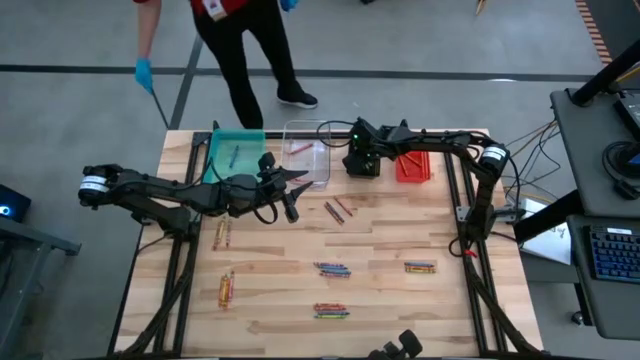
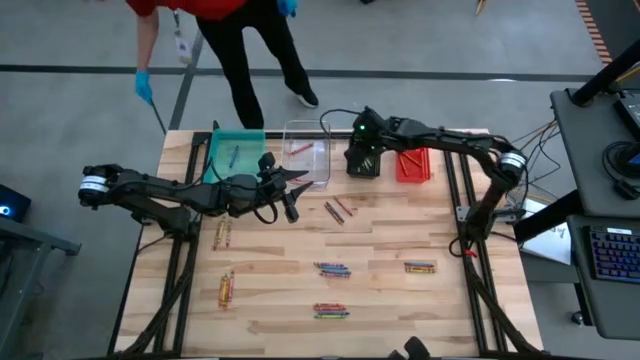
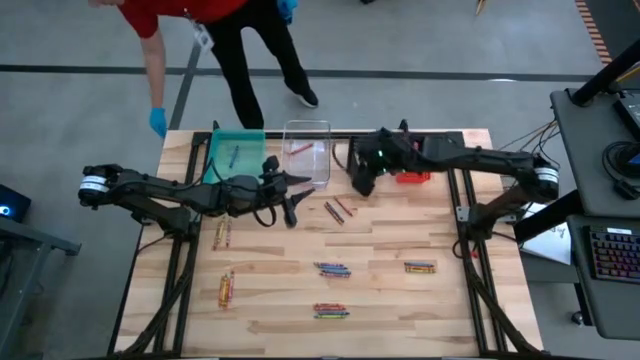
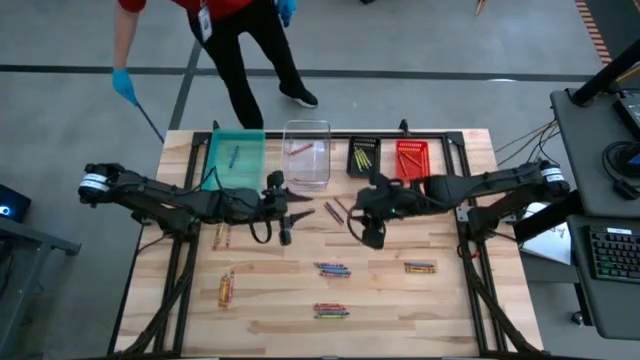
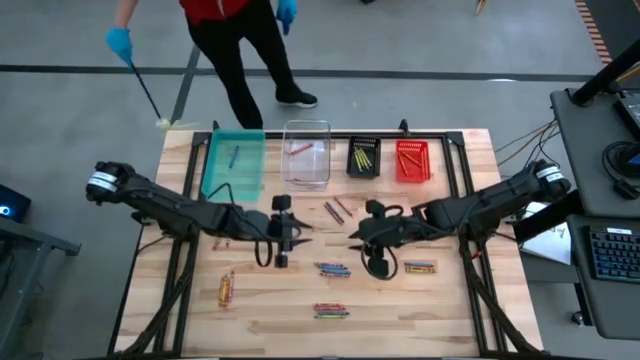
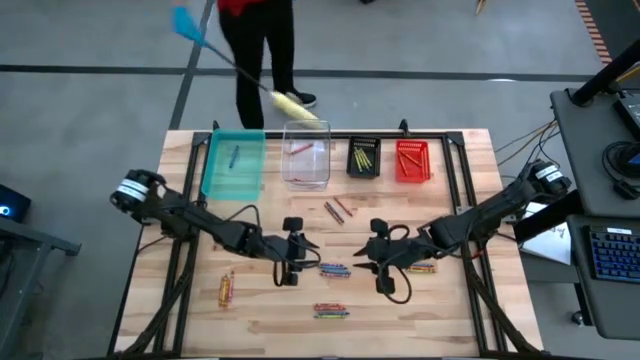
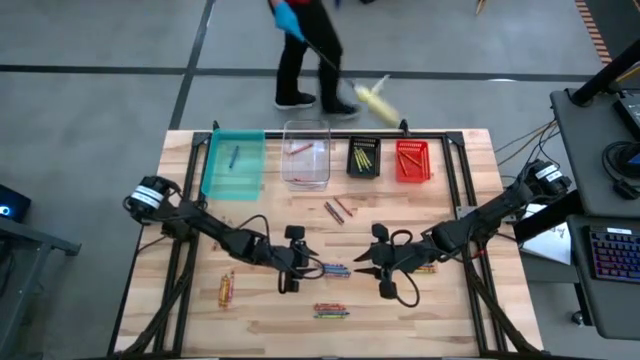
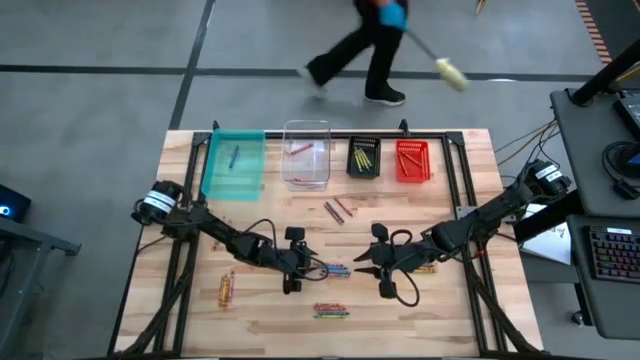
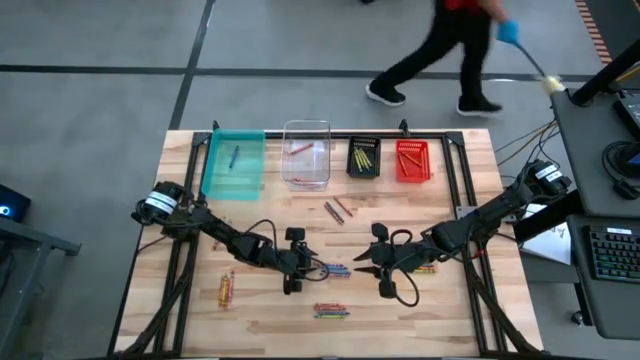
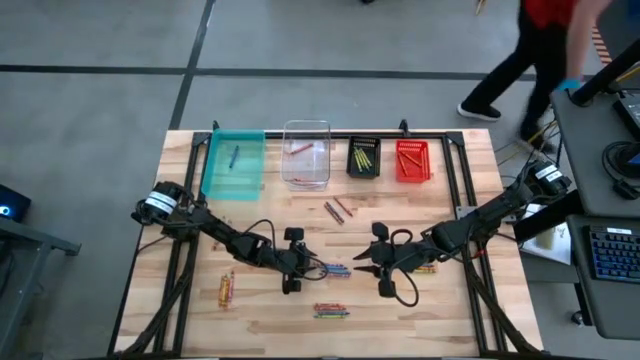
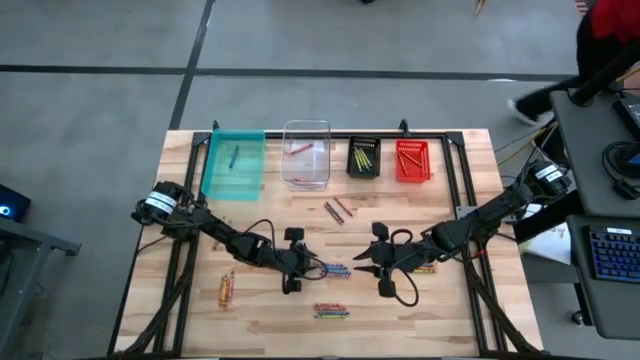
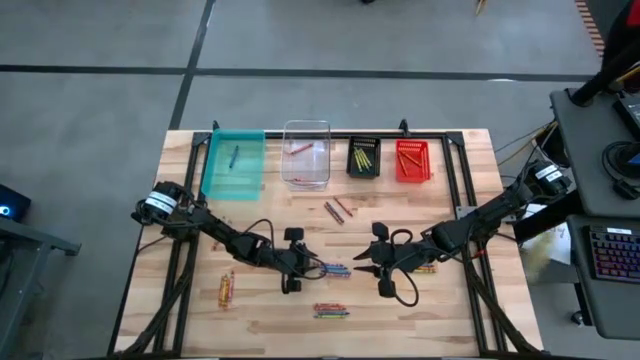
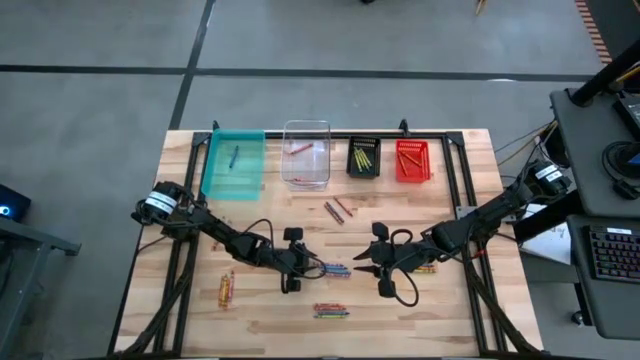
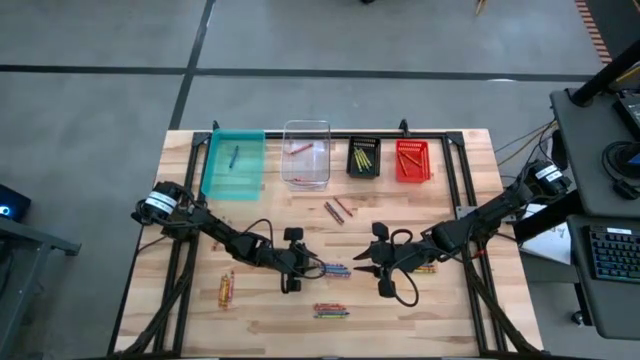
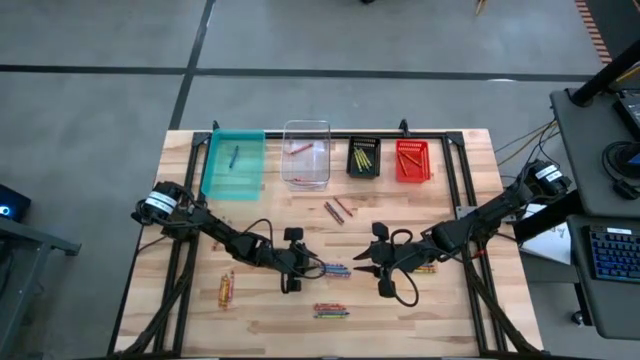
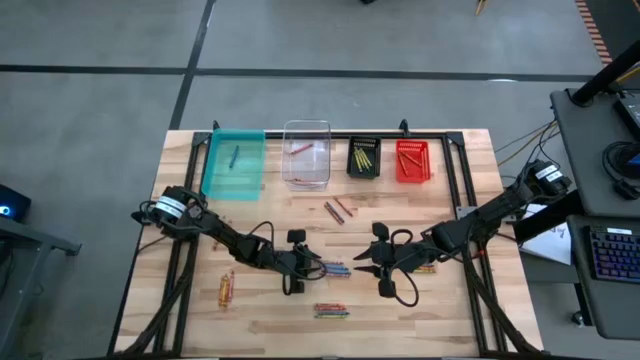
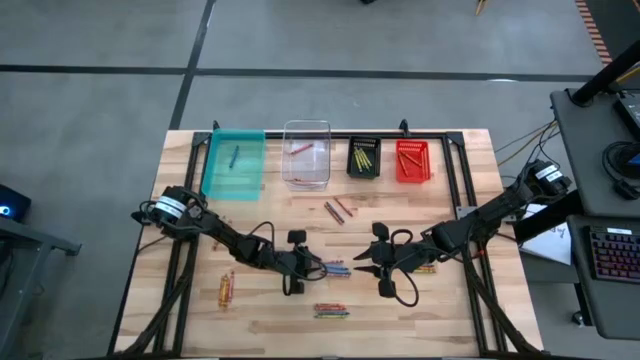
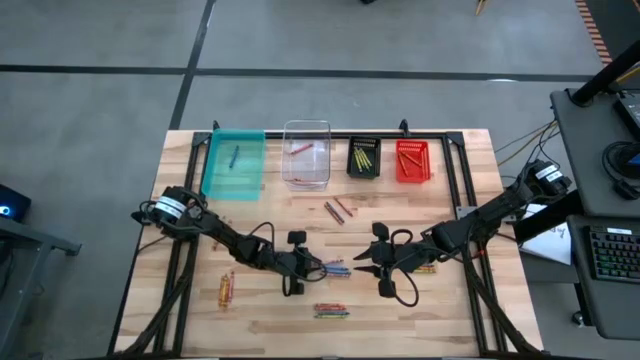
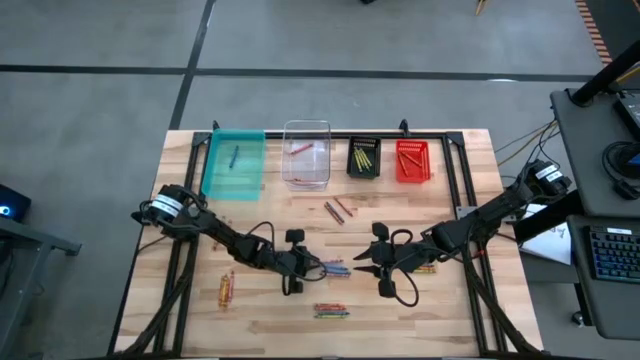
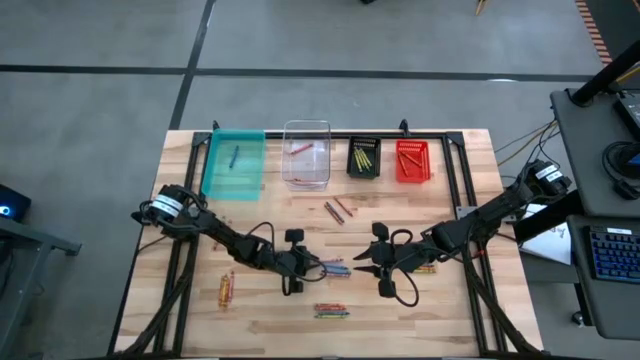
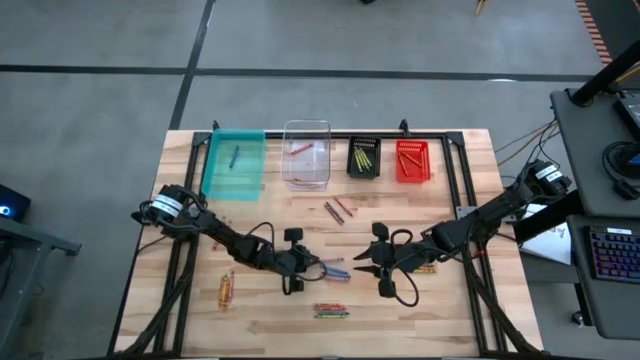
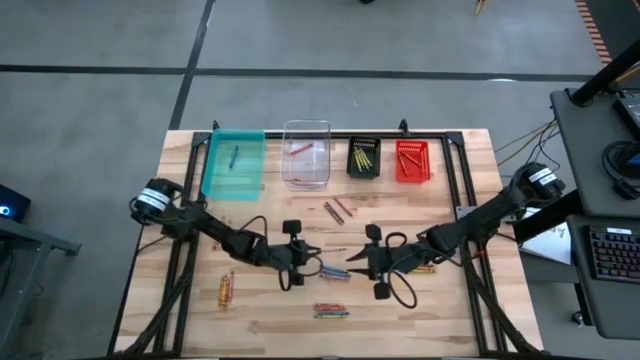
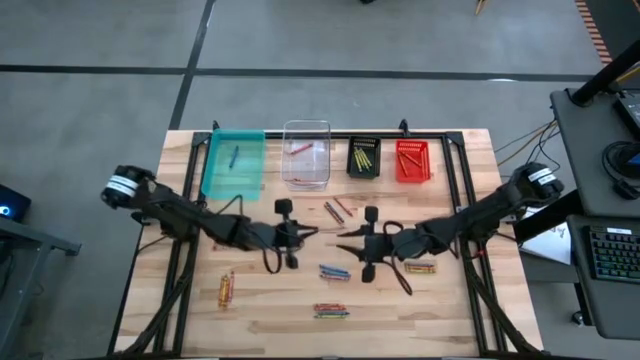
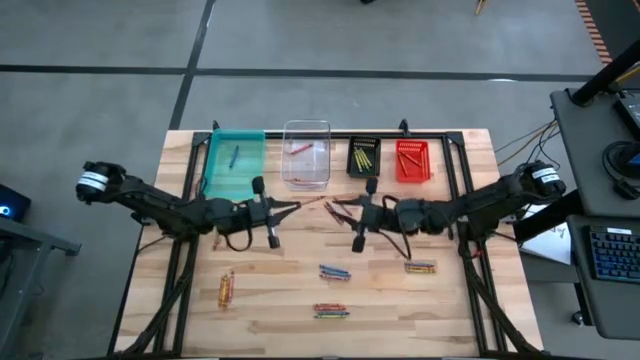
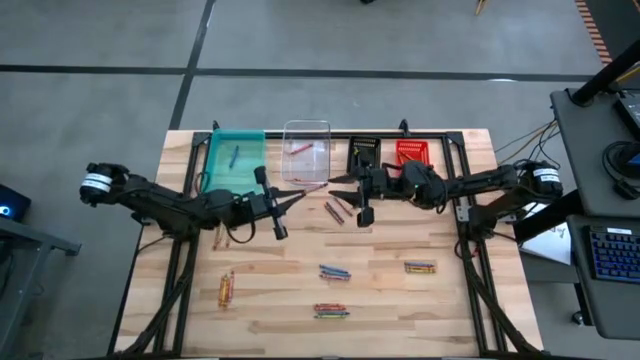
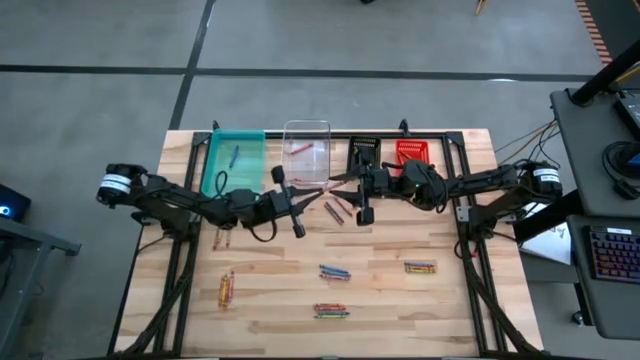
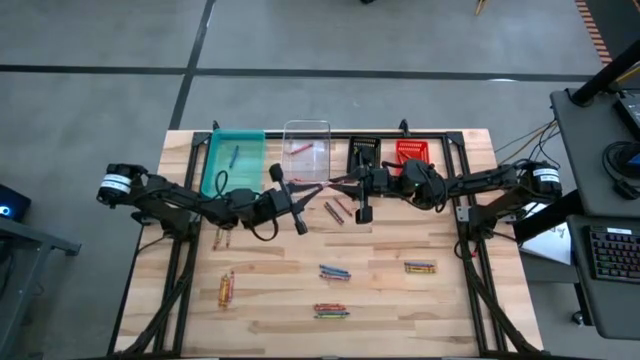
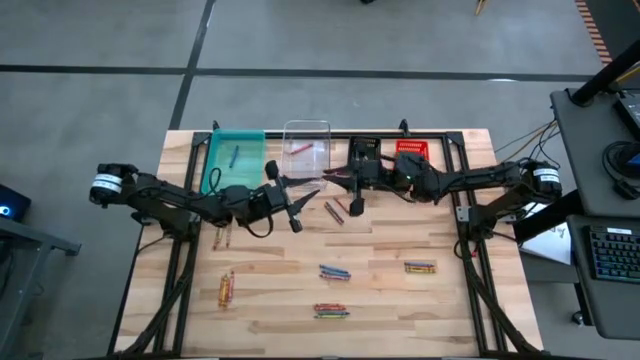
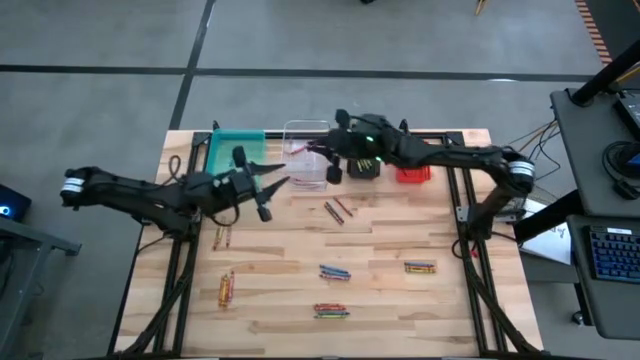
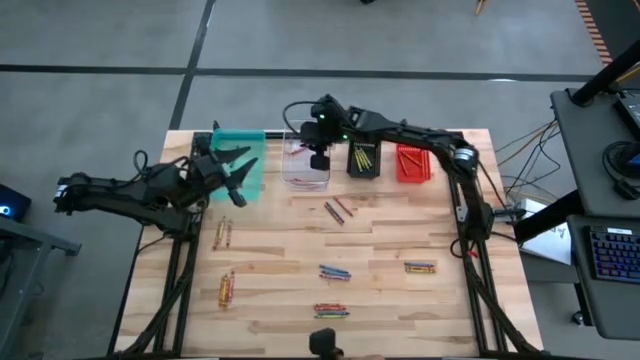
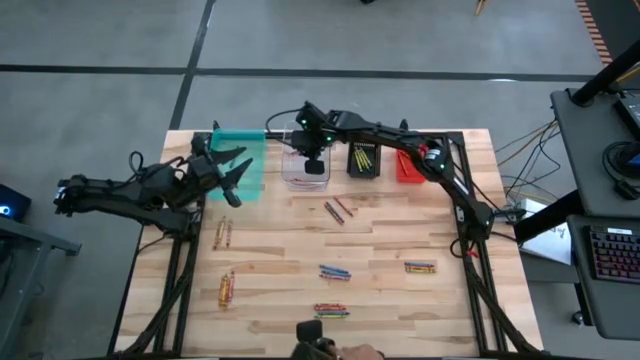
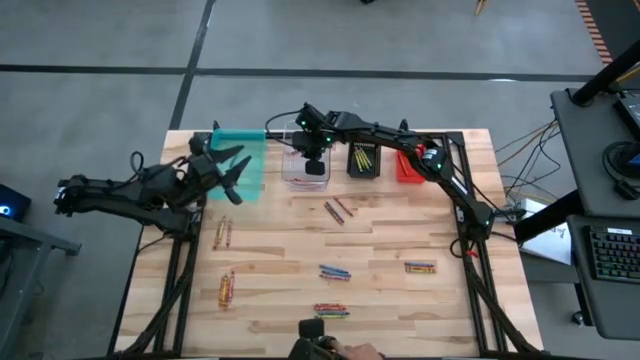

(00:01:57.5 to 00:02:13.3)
Task: Sort crayons
Put the red crayon into the transparent bin

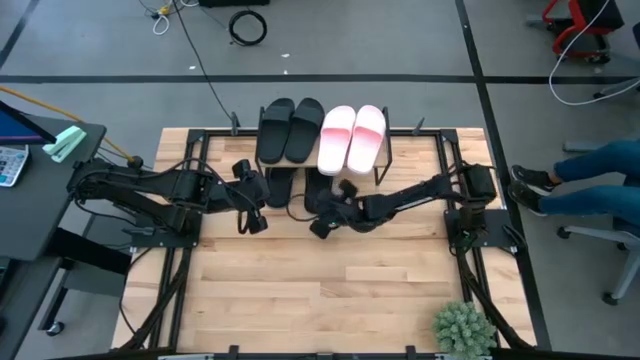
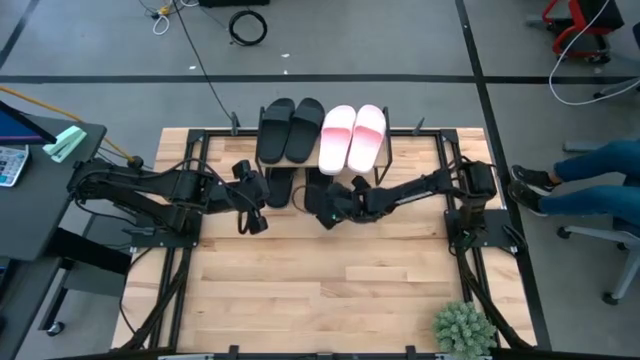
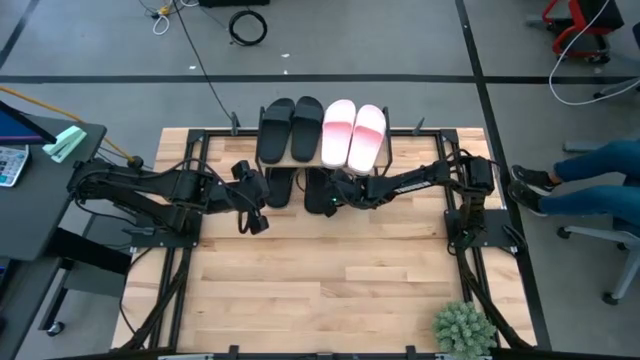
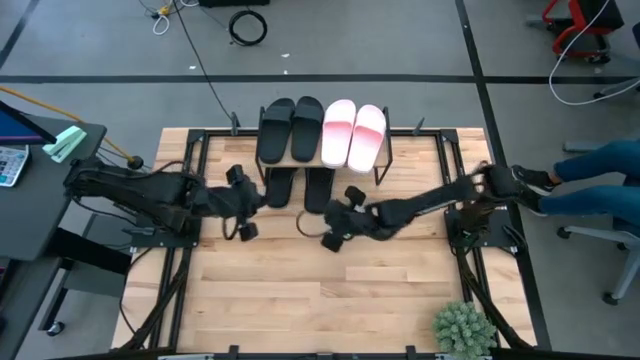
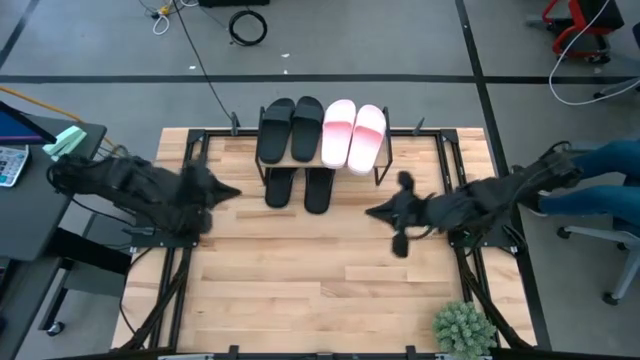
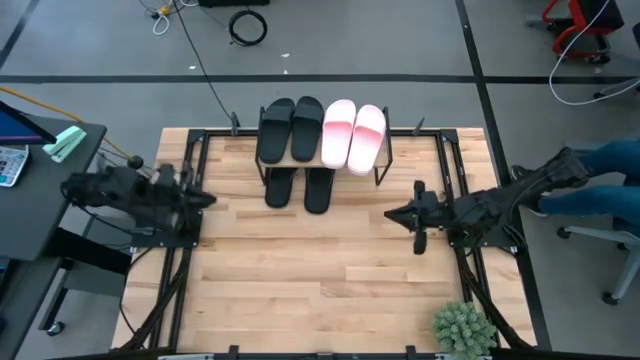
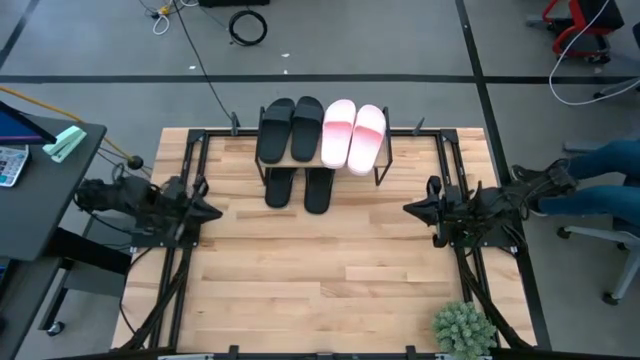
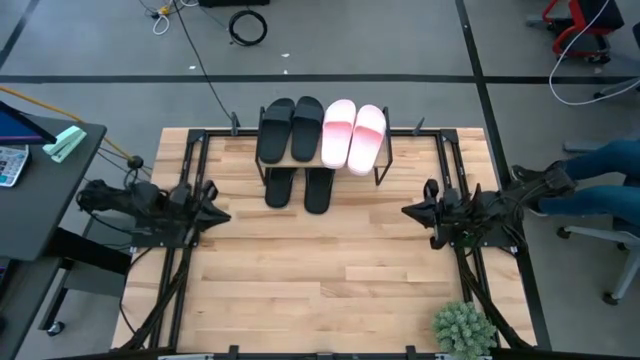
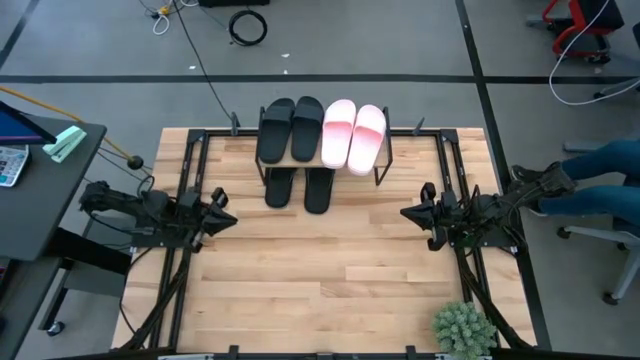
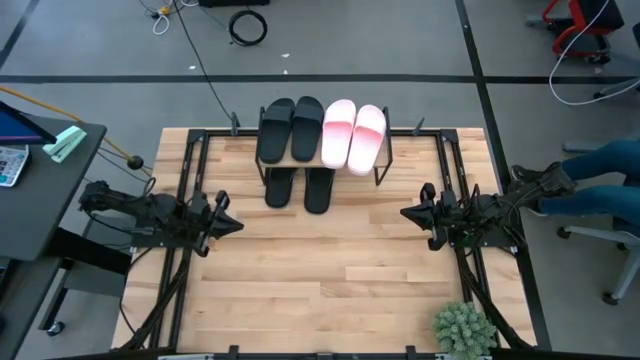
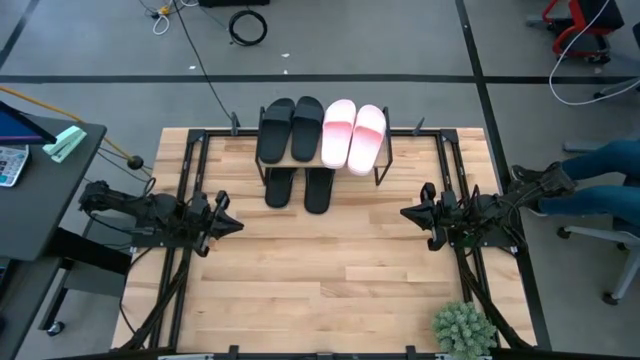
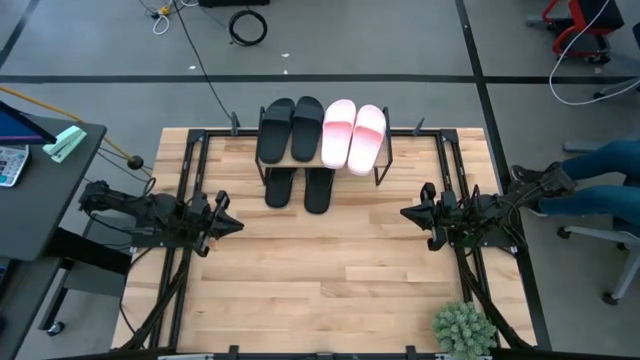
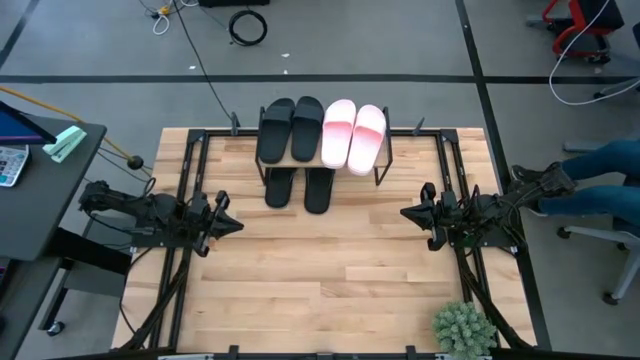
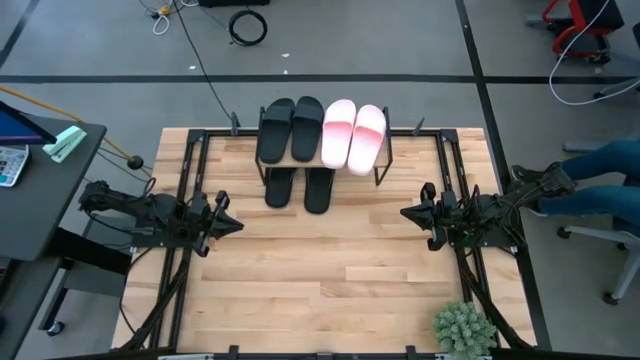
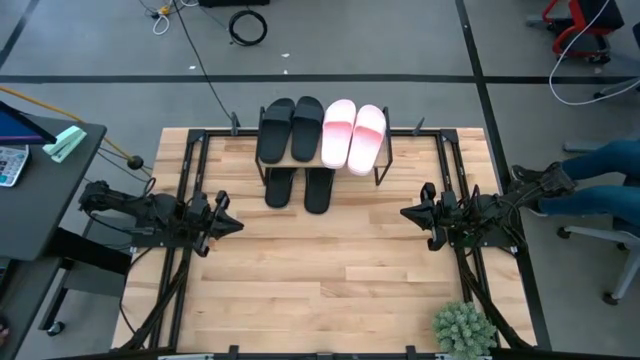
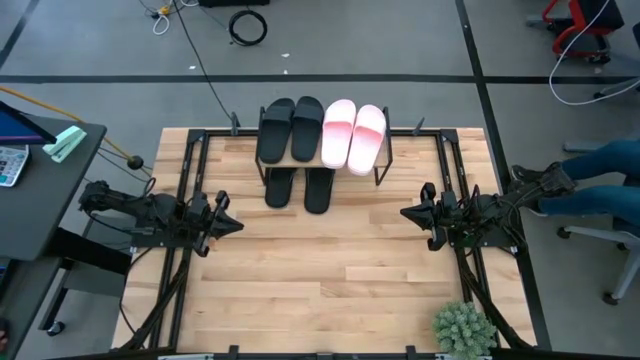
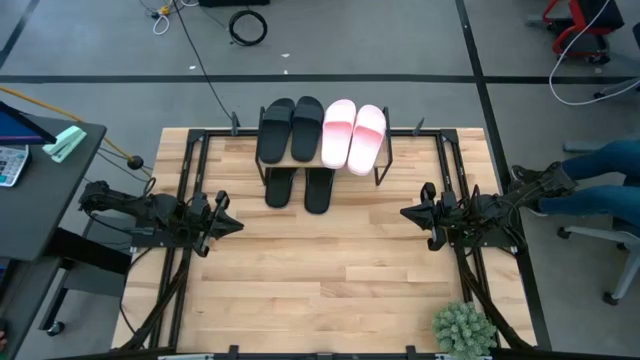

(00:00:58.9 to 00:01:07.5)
Task: Pick and place slides into the shelf
Return to Home Position
